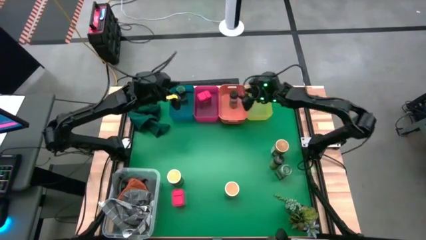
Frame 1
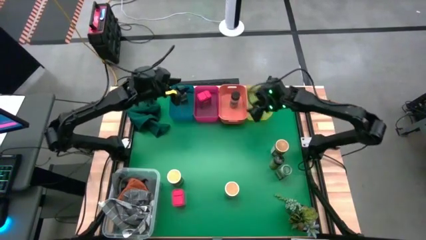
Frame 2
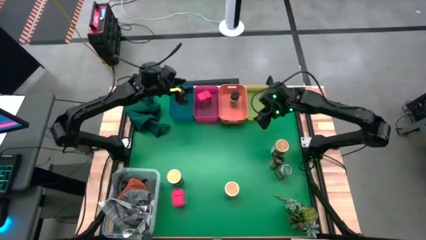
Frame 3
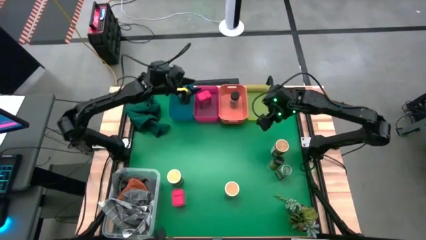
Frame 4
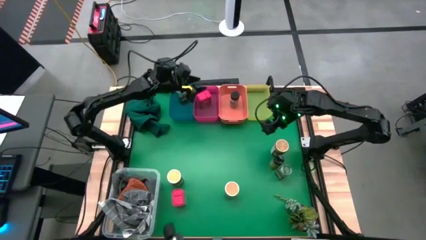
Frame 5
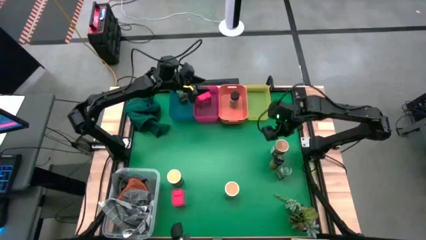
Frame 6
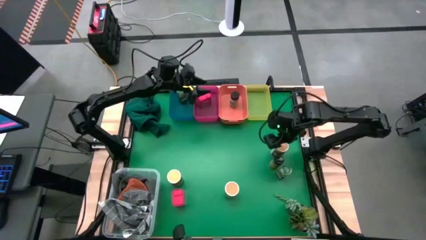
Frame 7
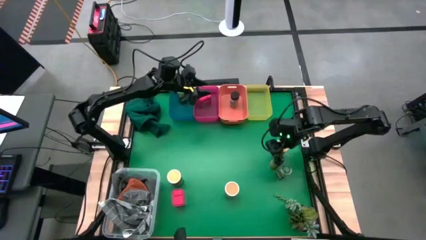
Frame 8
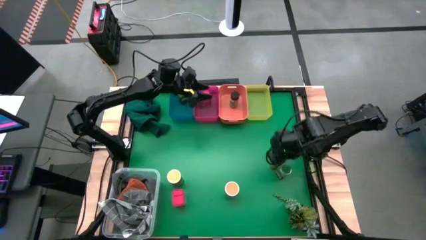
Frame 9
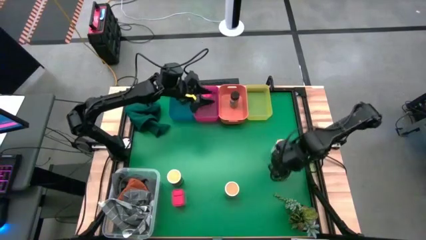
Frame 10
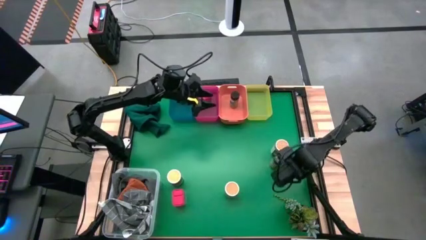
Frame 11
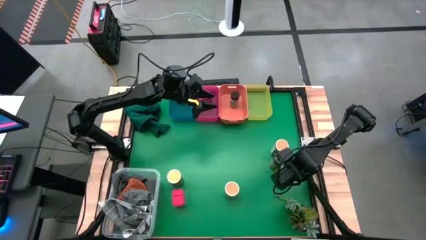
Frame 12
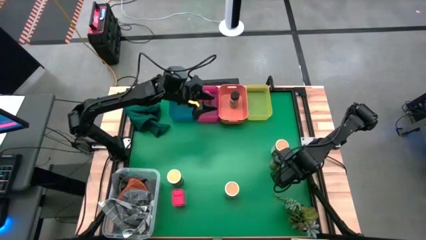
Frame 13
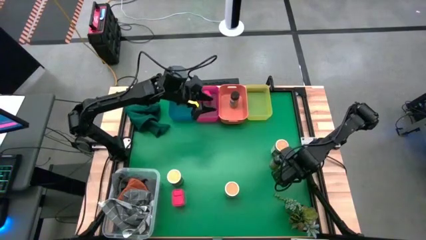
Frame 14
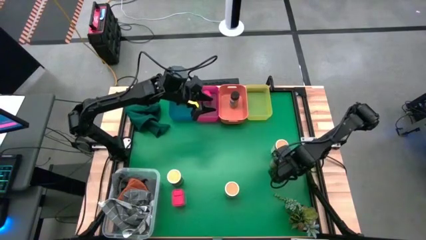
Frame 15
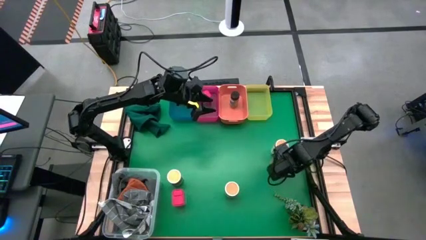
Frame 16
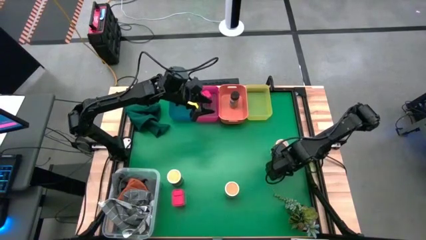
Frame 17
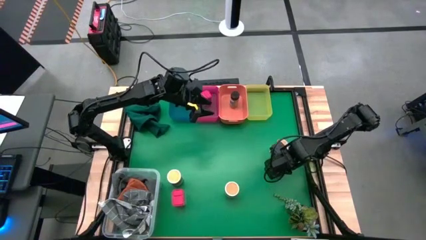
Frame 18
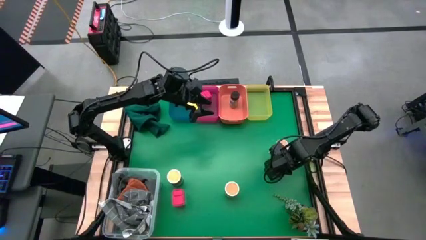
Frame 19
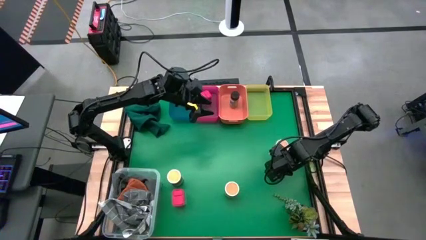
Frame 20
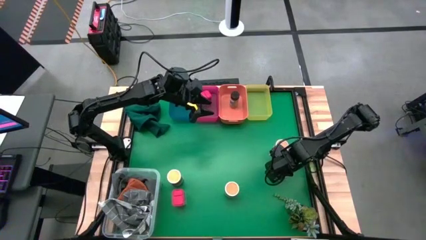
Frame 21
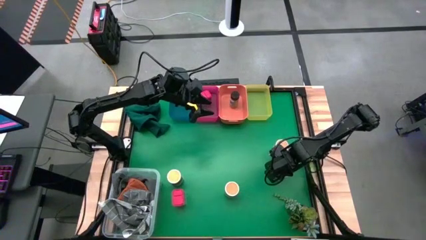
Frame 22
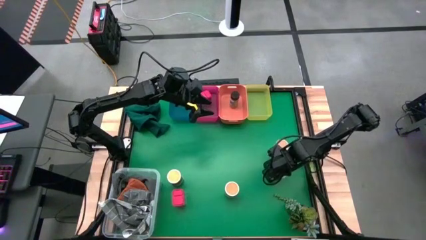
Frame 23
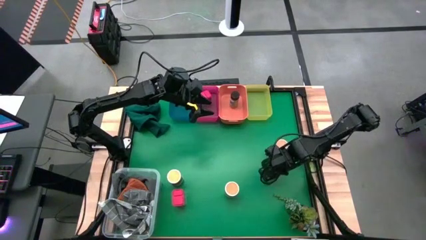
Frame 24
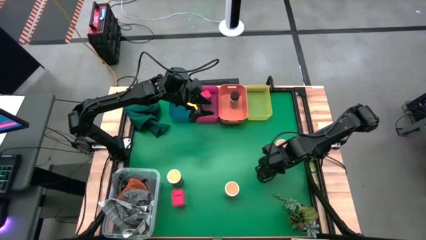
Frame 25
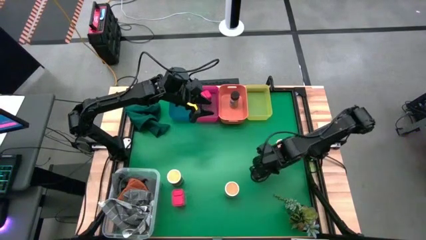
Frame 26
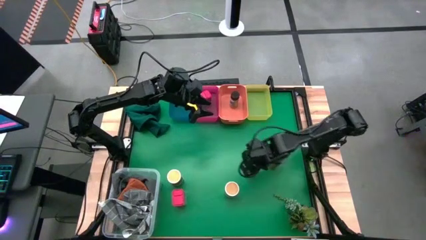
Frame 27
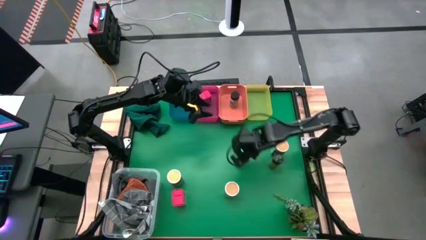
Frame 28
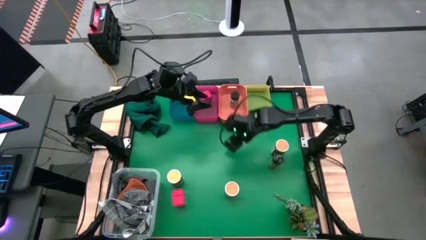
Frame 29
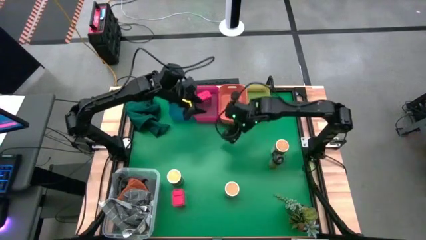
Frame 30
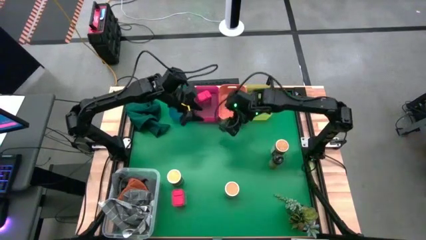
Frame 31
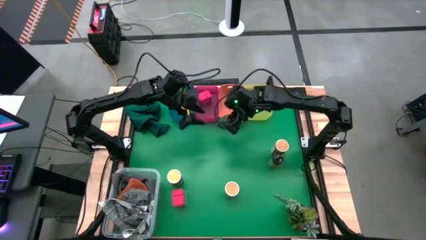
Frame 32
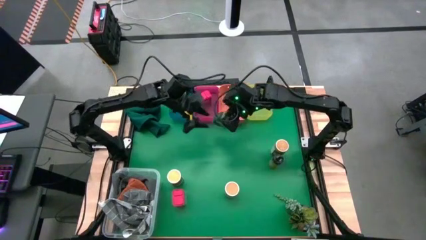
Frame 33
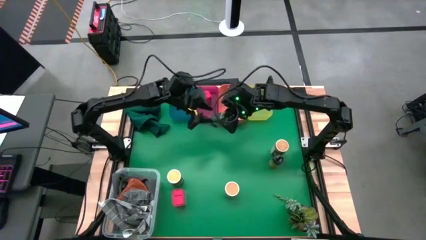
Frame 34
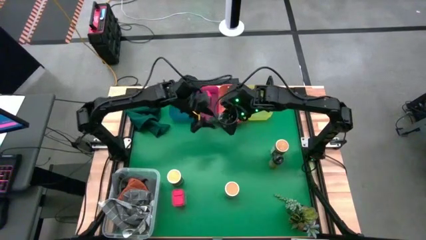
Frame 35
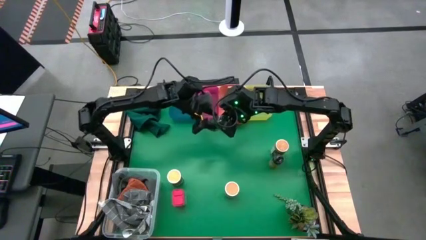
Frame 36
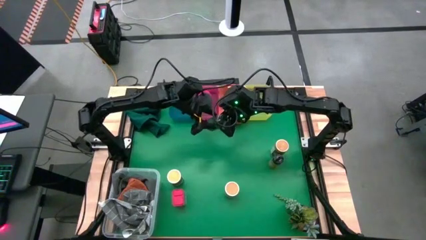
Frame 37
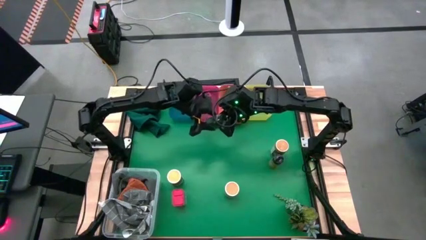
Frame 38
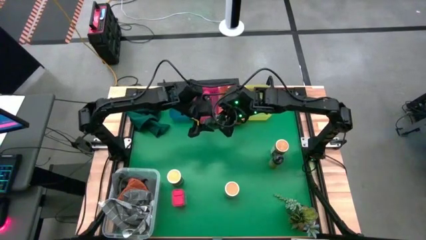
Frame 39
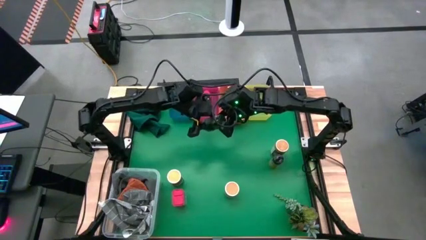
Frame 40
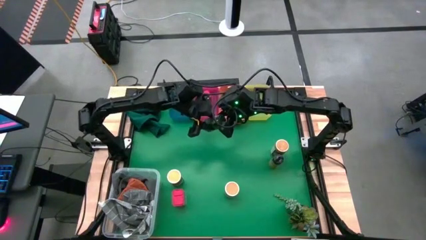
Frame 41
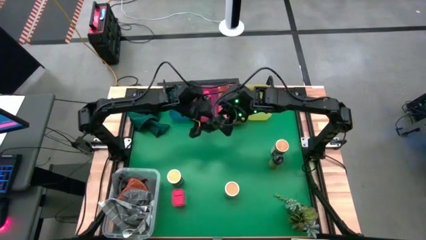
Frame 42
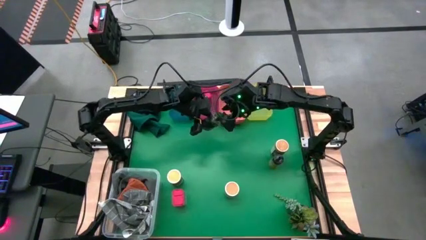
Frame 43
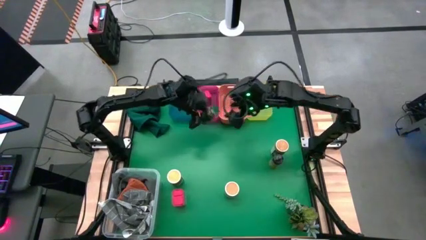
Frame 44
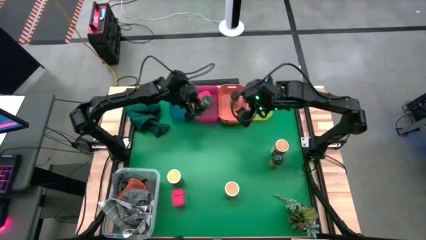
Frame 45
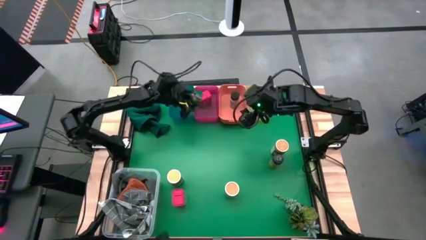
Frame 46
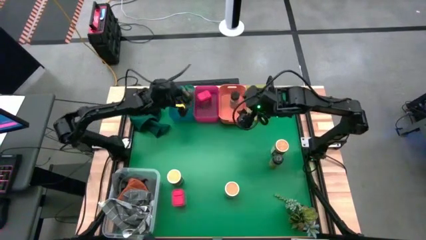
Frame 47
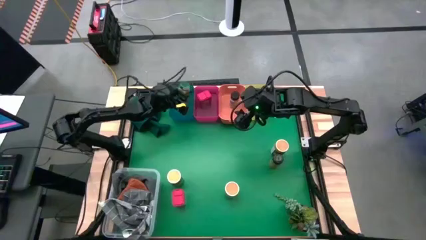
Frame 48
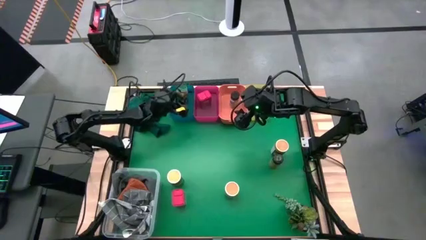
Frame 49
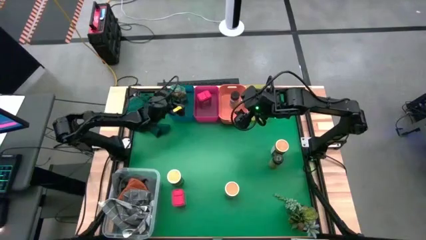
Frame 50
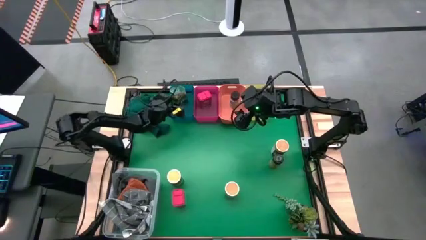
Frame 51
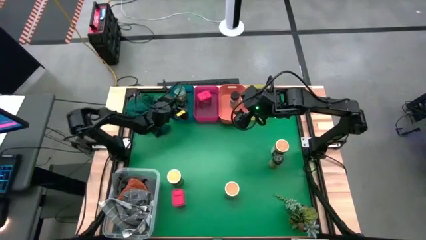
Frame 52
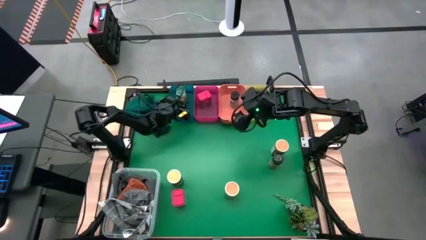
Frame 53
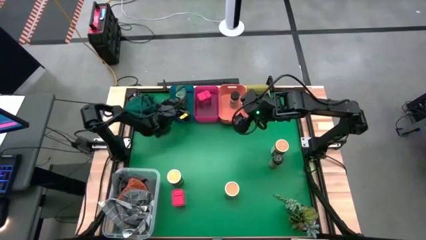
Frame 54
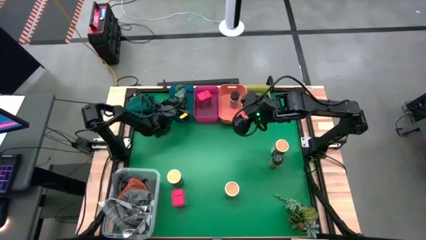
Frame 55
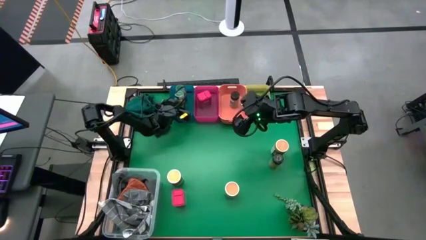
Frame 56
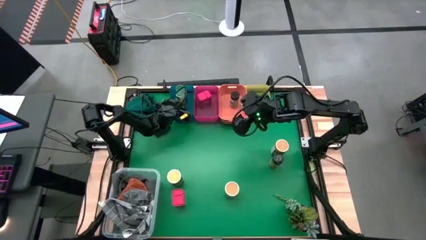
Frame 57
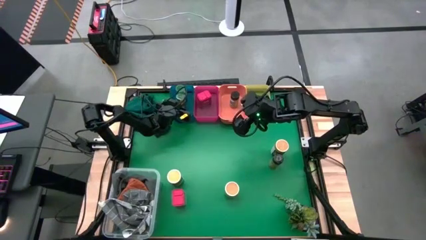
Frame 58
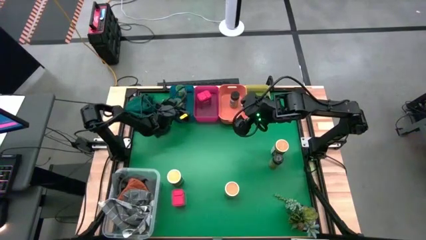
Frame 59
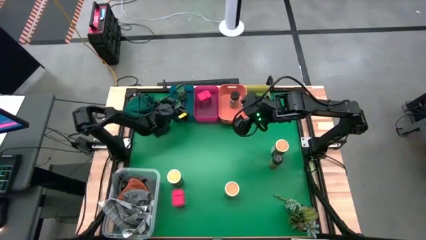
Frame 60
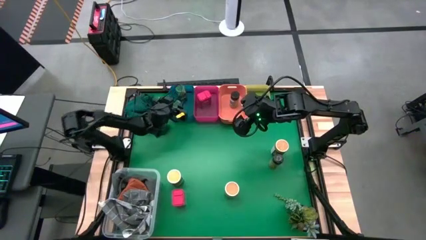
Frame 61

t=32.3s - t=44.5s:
Task: Sort spices by type
Put the green spice bottle into the blue bin
